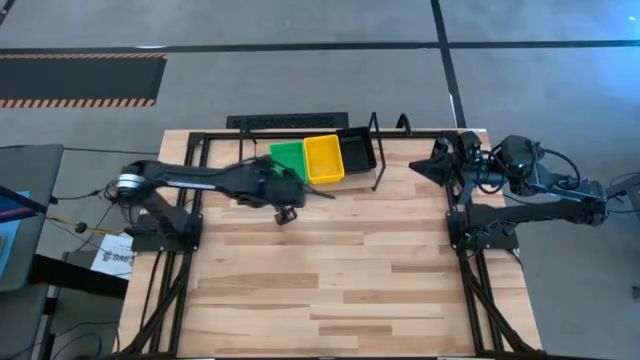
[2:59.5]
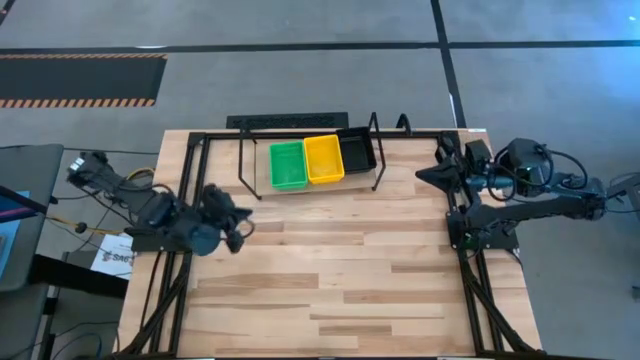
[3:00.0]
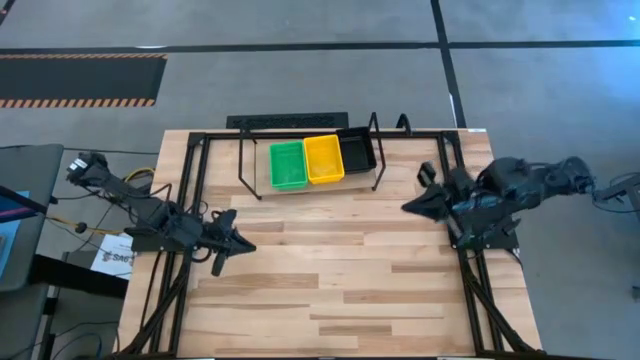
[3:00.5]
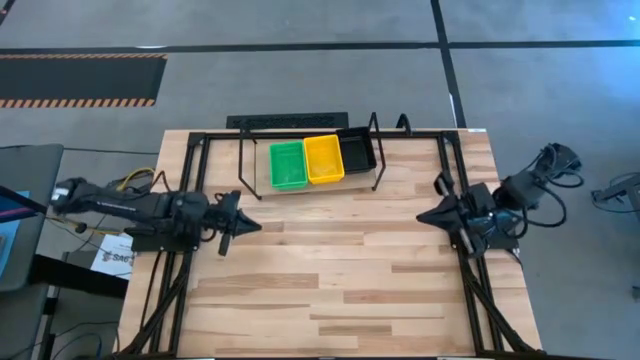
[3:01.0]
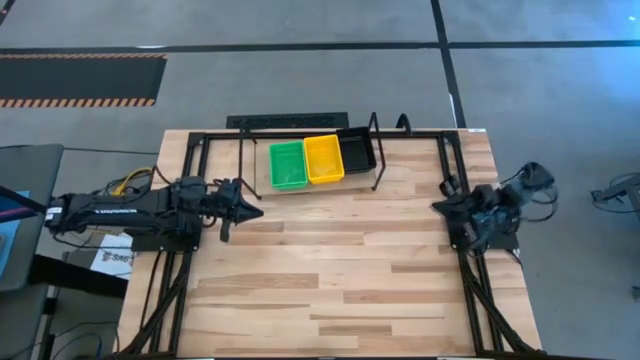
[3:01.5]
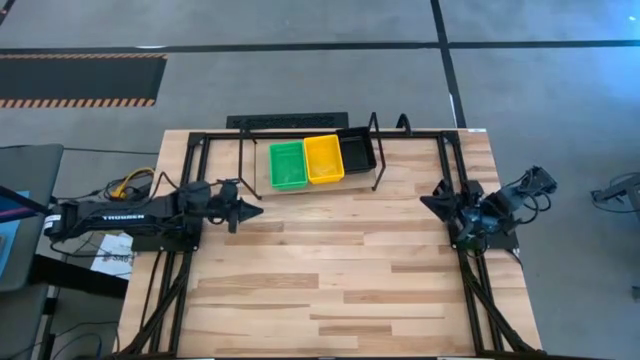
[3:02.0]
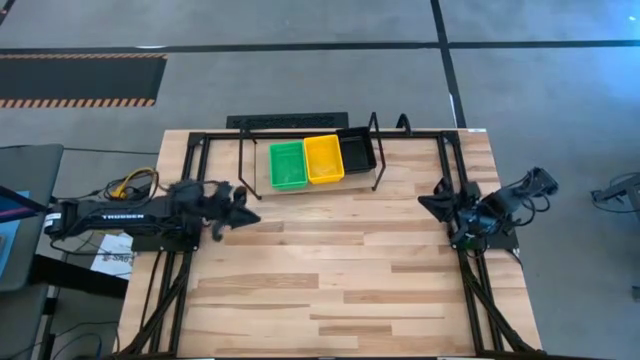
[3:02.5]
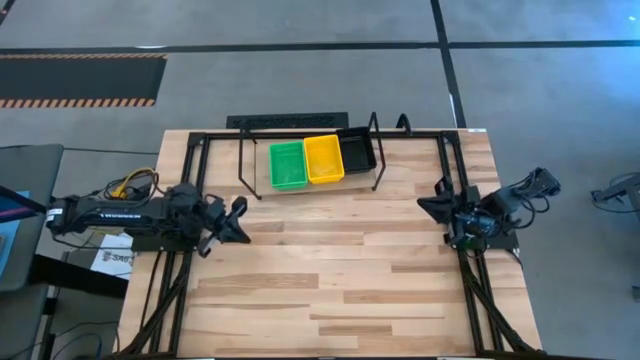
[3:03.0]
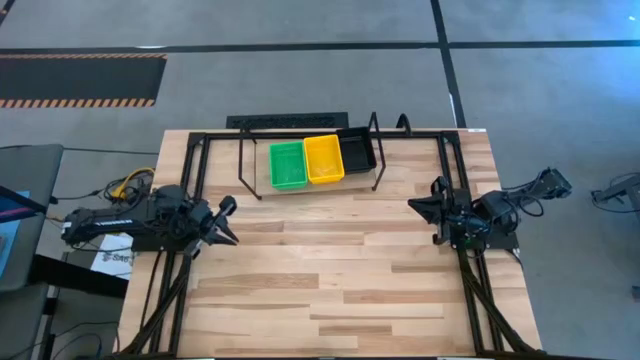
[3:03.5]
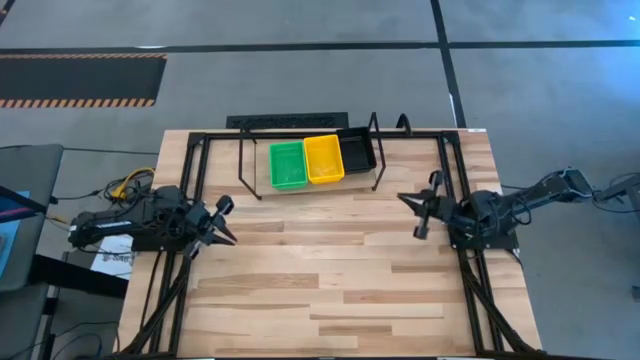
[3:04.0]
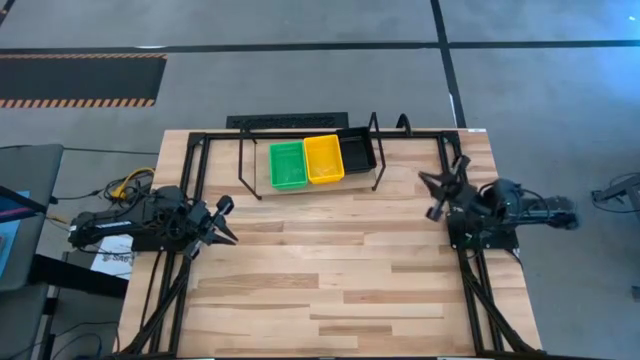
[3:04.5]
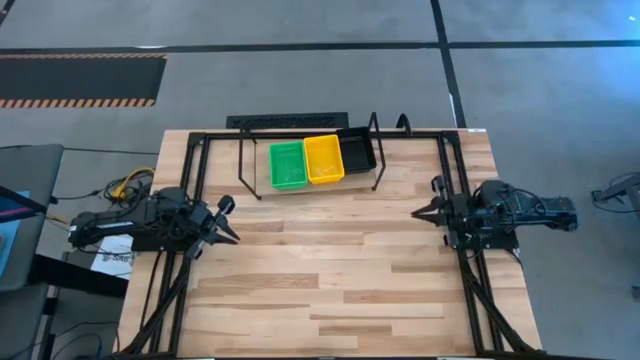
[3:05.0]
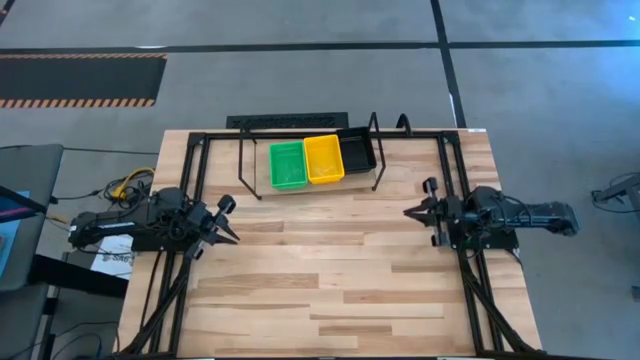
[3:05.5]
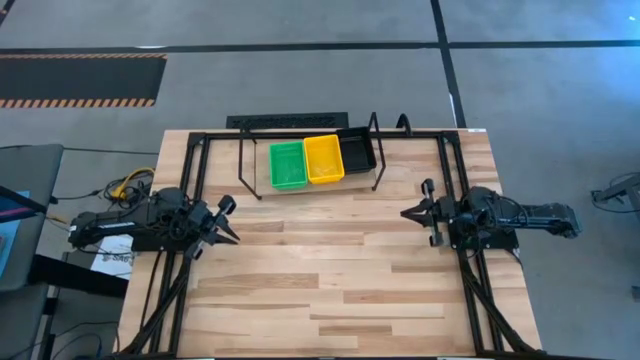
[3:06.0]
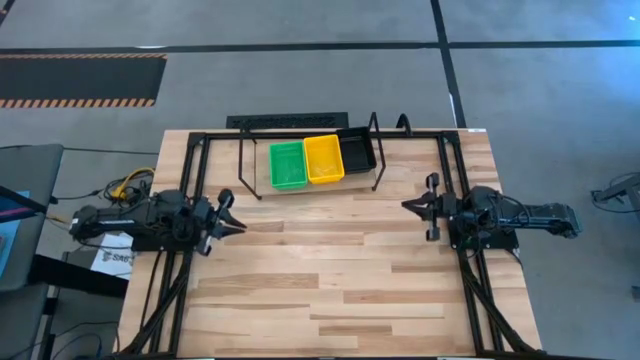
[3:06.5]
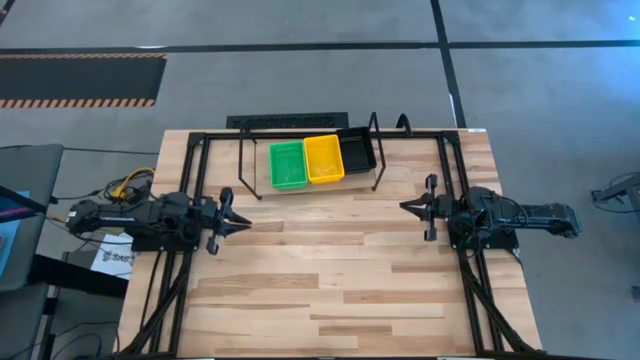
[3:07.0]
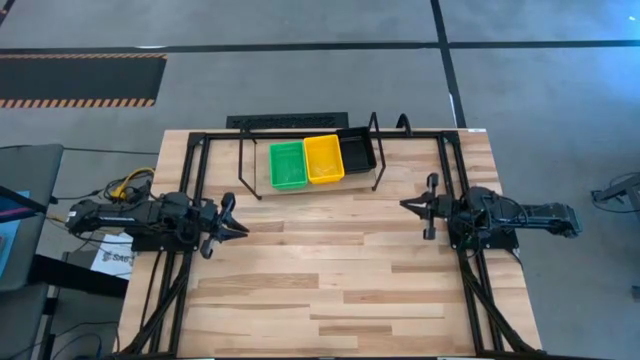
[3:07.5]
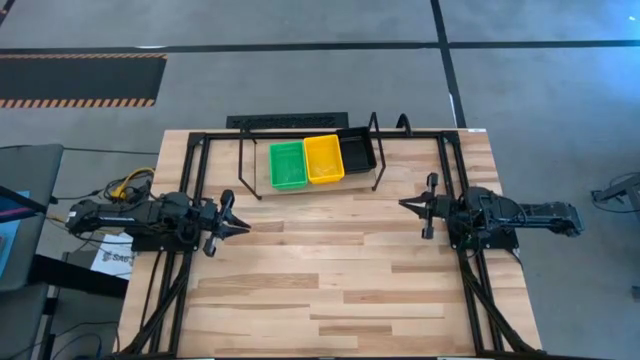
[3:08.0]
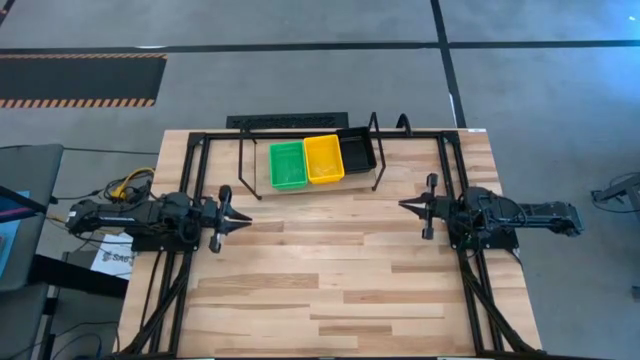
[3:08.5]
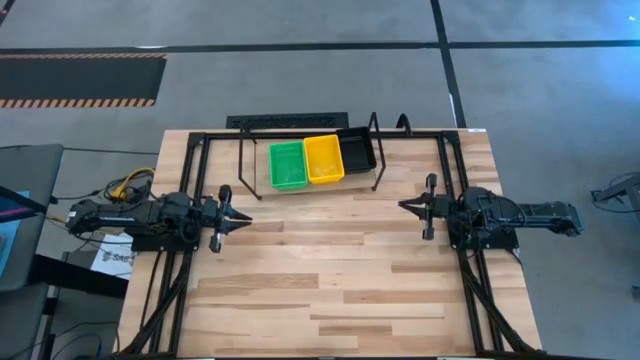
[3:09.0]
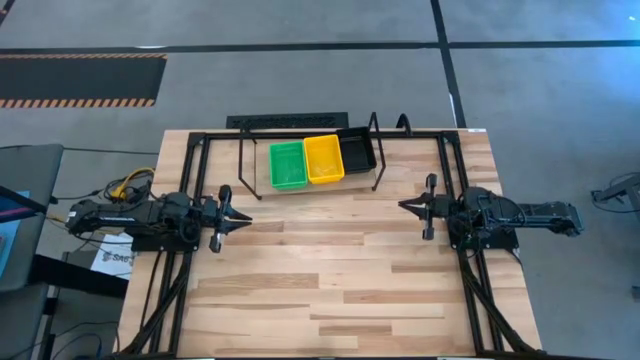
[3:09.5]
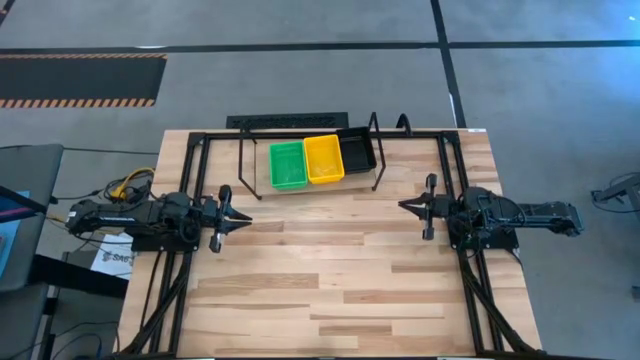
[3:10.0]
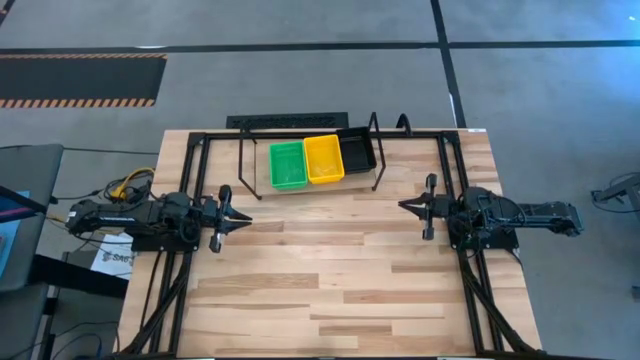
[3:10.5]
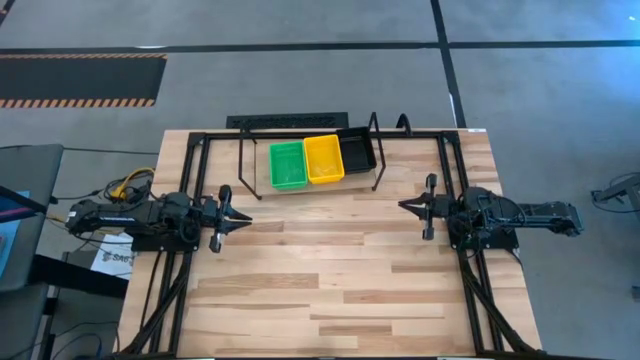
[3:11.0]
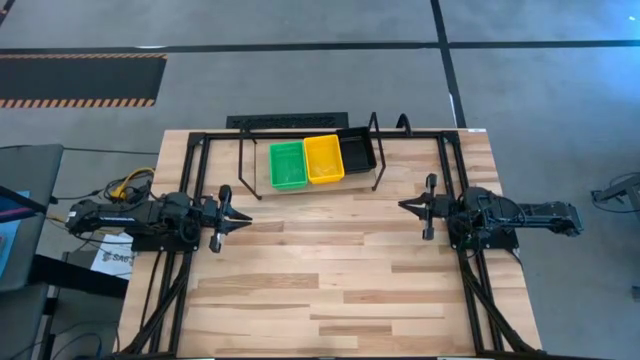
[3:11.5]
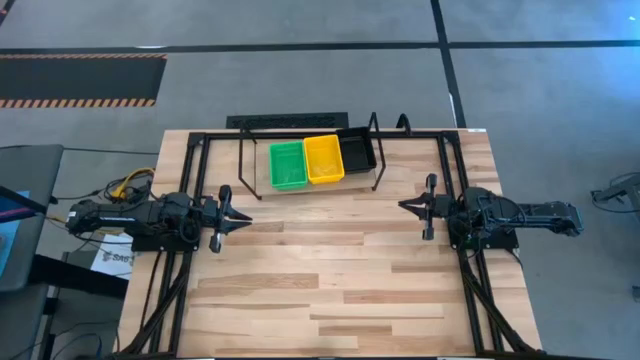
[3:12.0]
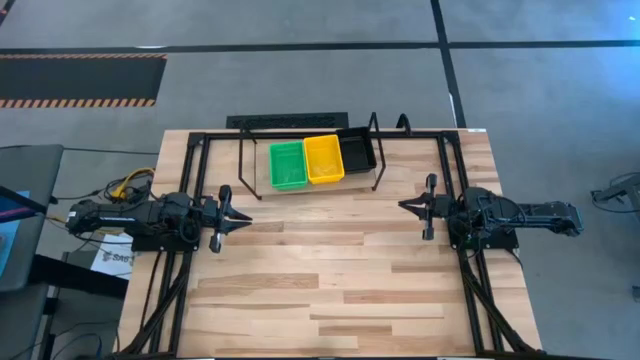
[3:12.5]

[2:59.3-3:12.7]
Task: Stack baskets on shelf by color
Return to Home Position

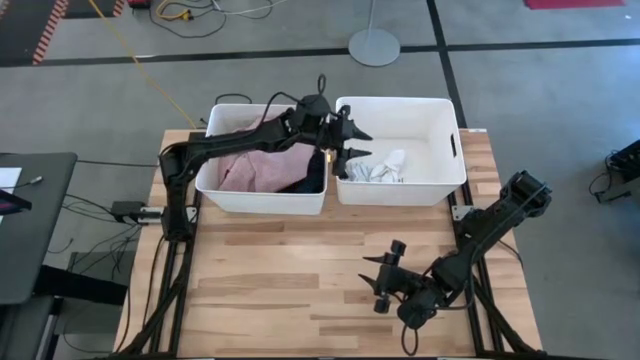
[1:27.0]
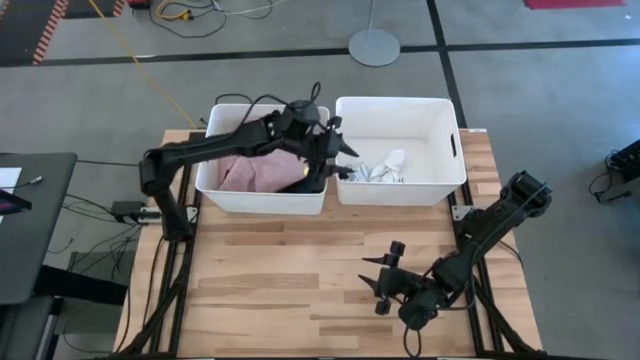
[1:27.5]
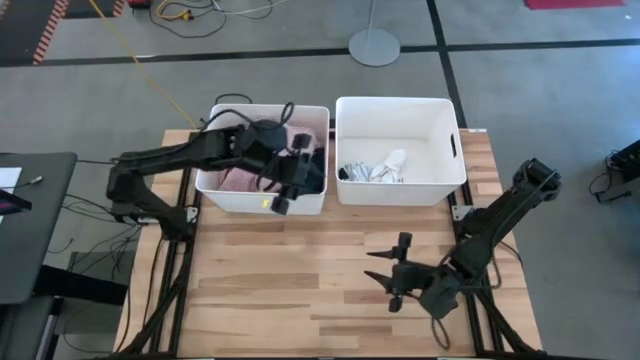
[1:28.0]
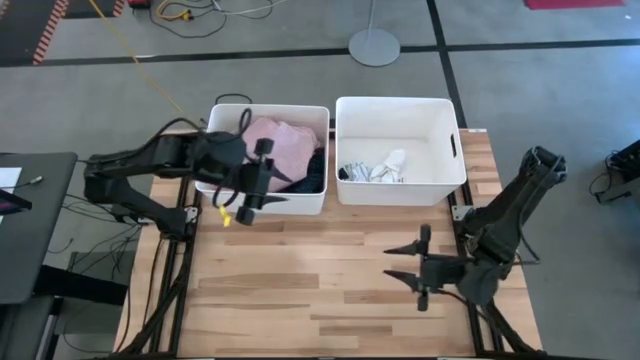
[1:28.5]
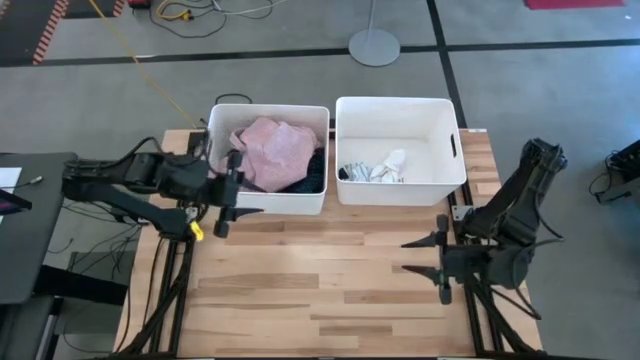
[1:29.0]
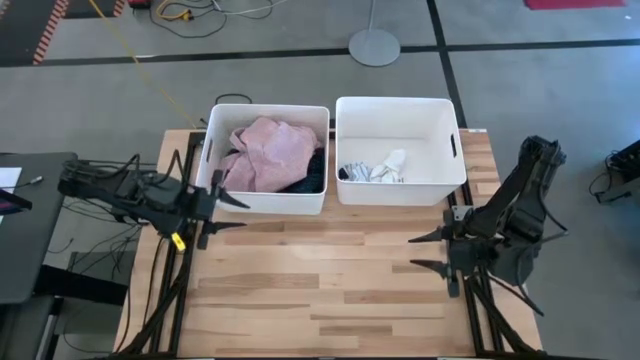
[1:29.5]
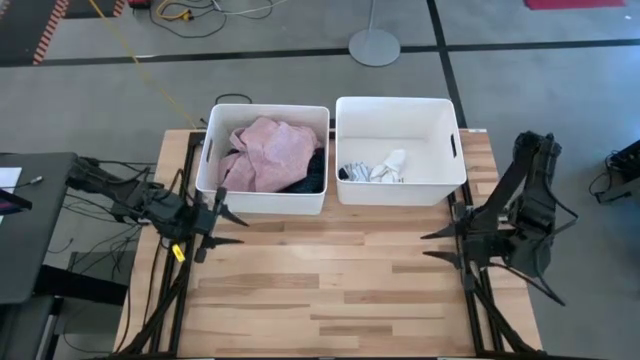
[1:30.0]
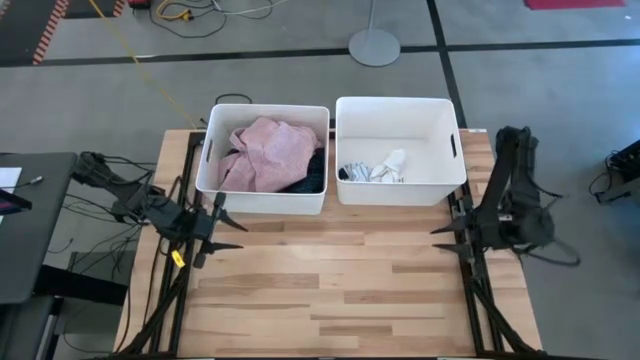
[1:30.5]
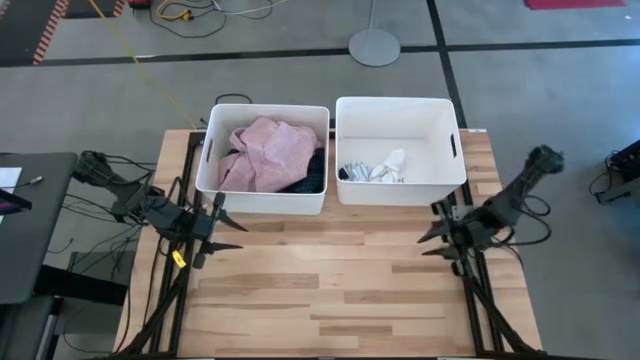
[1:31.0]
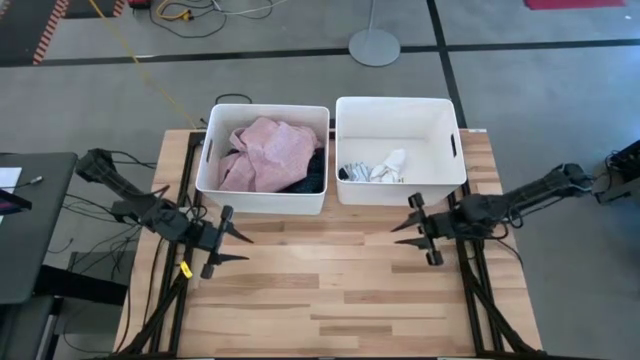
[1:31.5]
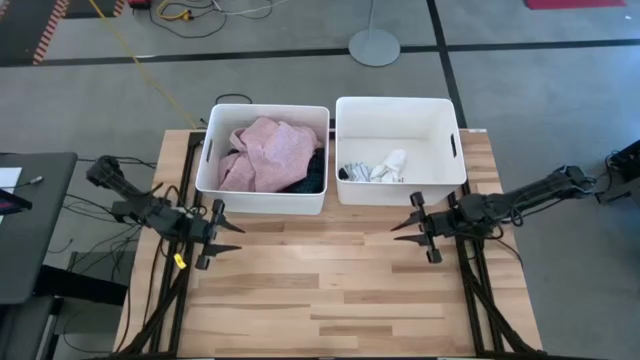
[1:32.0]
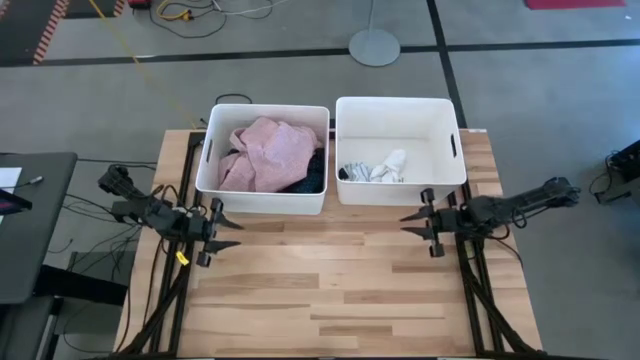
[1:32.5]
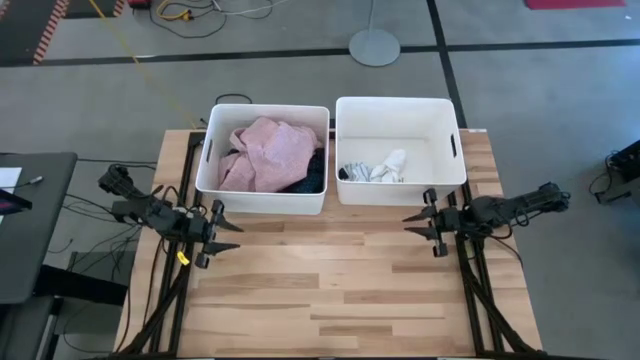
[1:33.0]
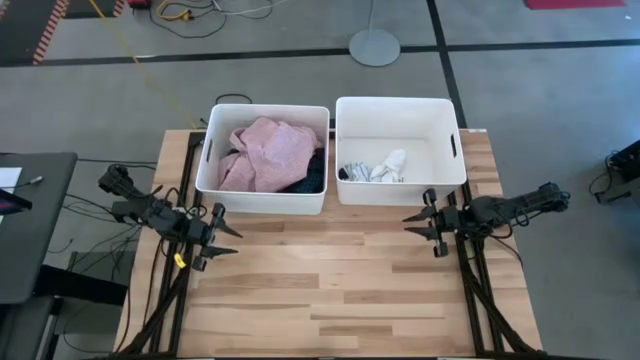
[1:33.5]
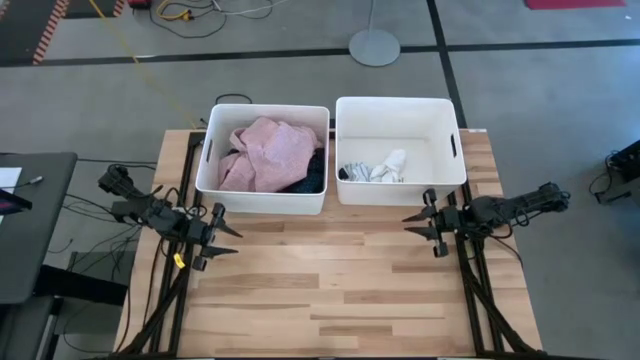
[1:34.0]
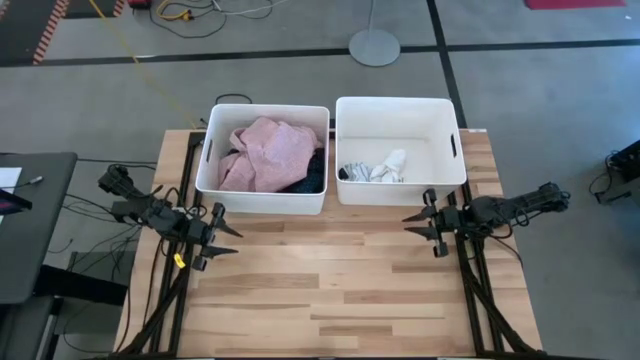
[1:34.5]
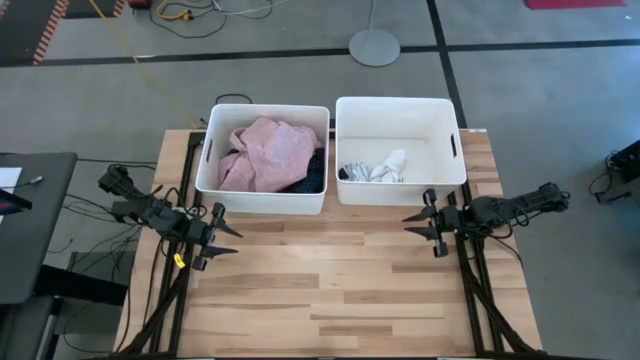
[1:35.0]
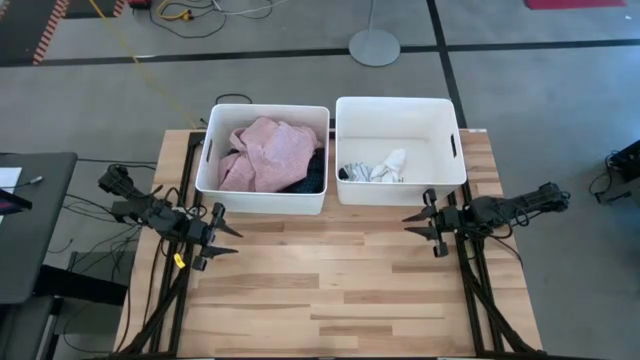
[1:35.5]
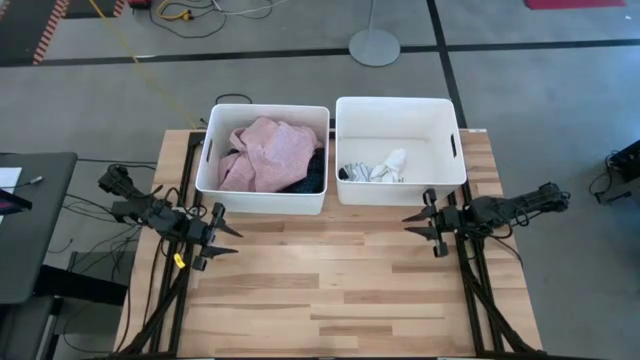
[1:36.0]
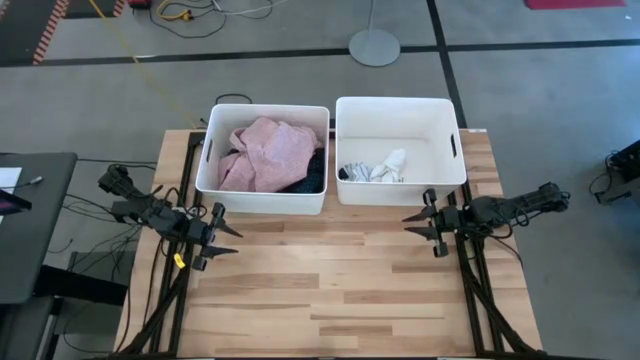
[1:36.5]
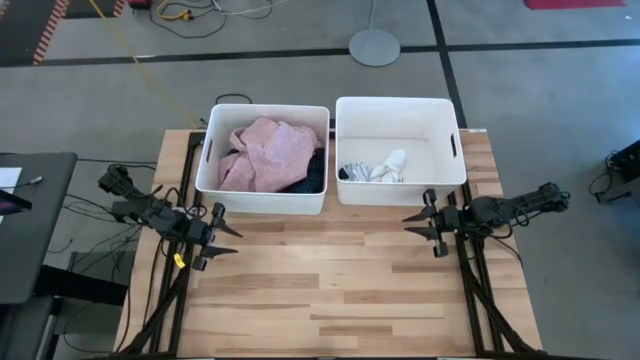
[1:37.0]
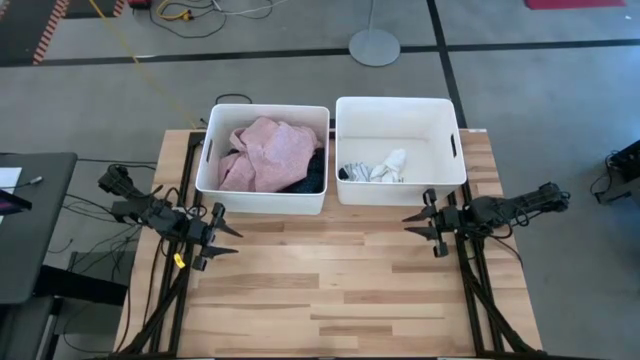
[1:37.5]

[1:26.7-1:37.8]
Task: Sort clothes
Return to Home Position
